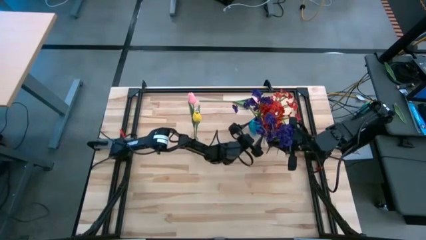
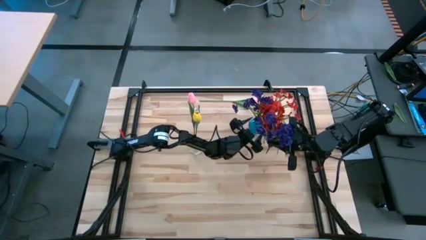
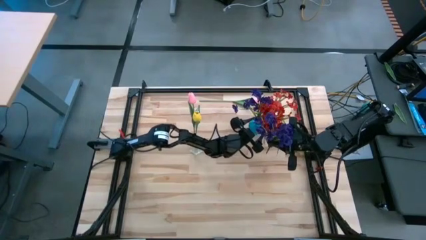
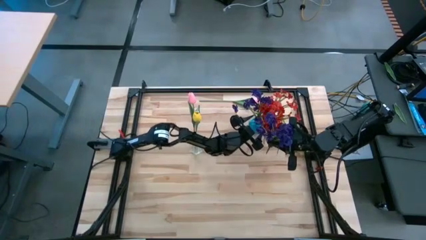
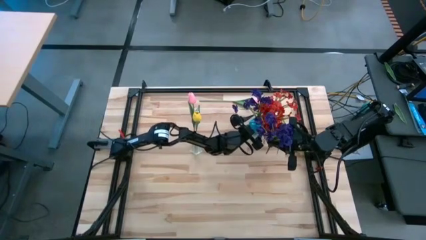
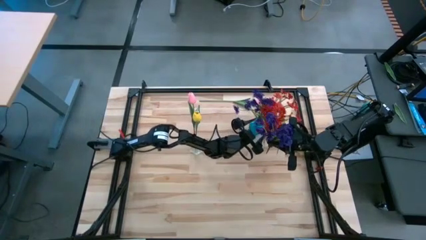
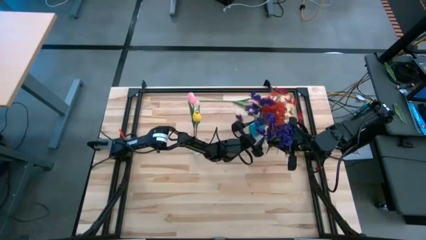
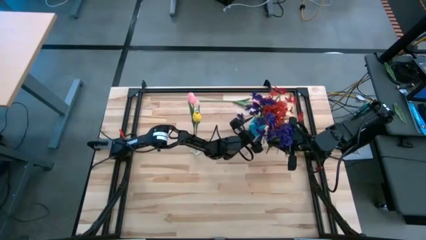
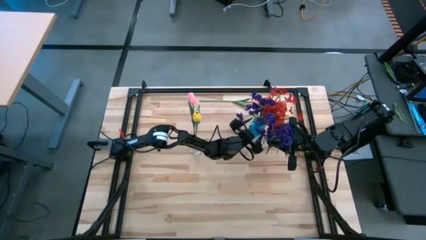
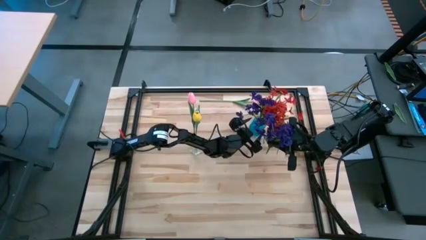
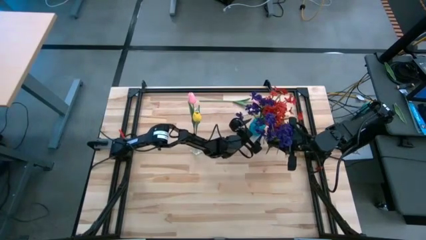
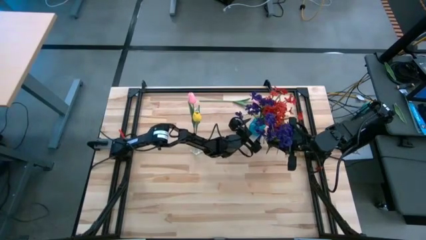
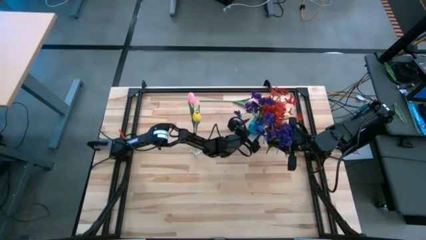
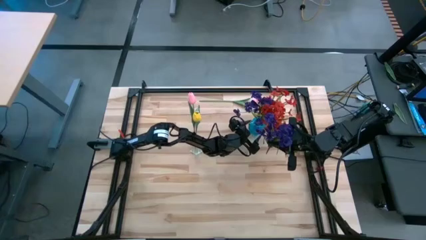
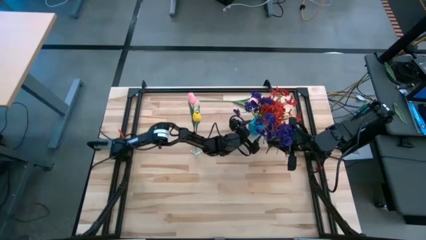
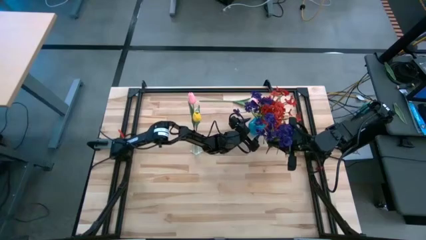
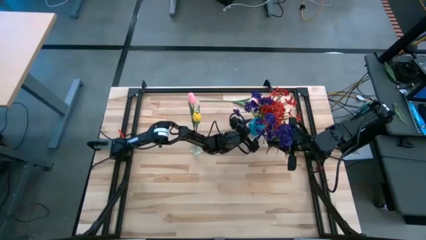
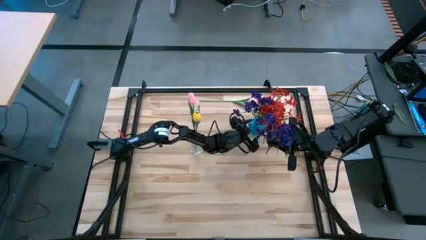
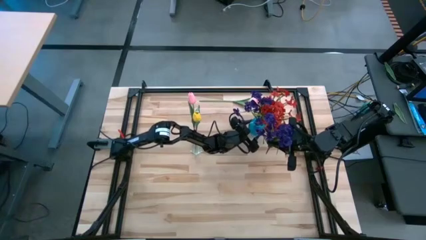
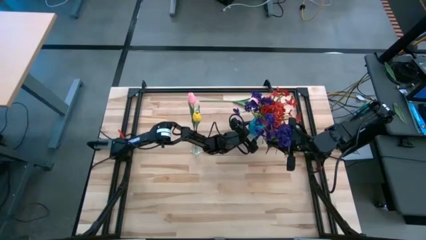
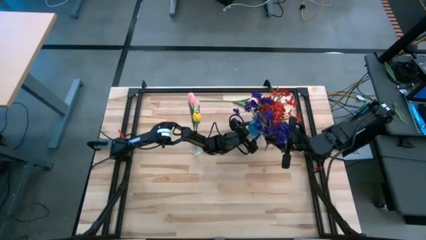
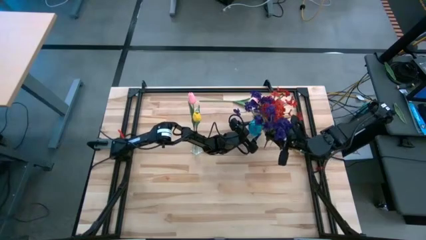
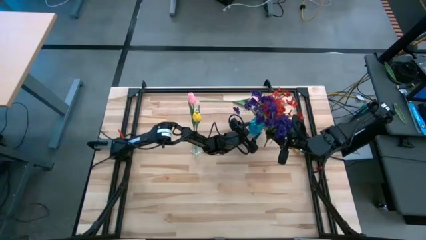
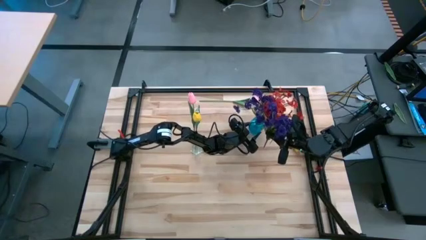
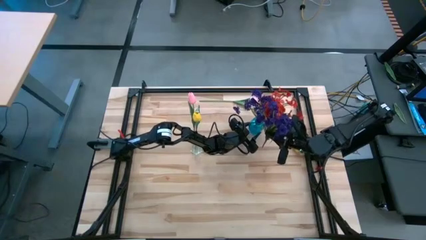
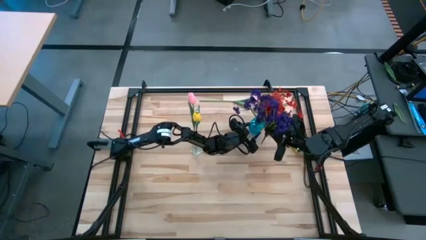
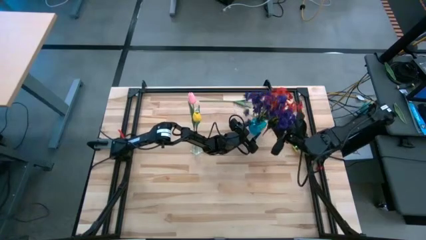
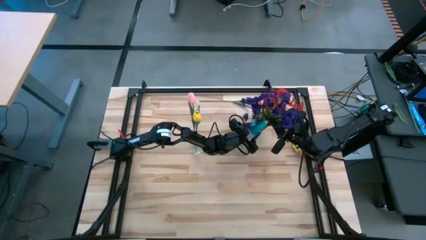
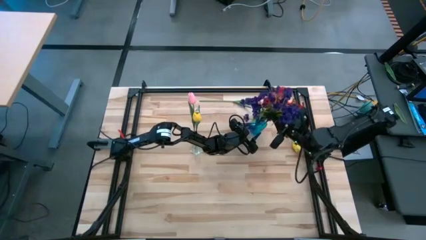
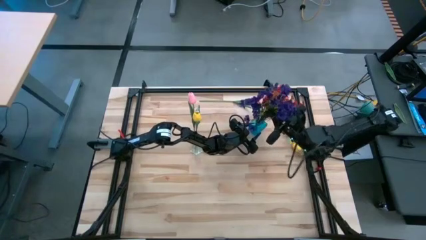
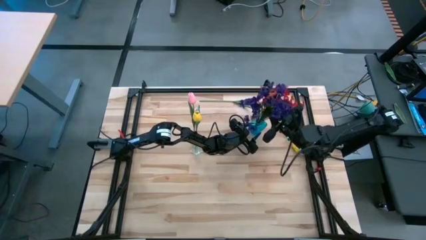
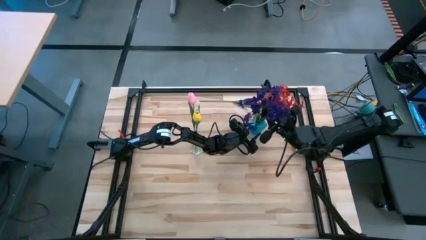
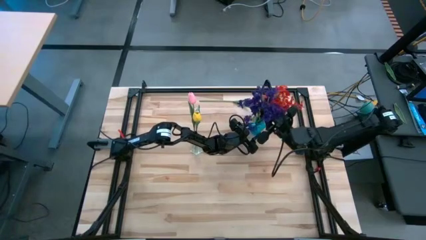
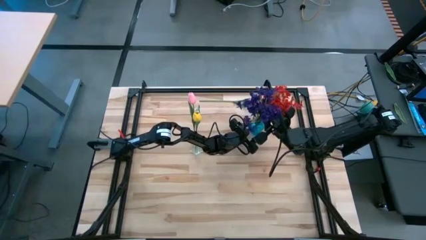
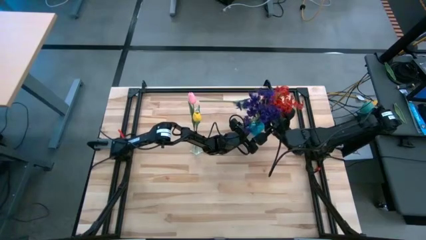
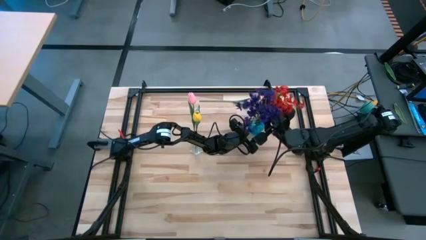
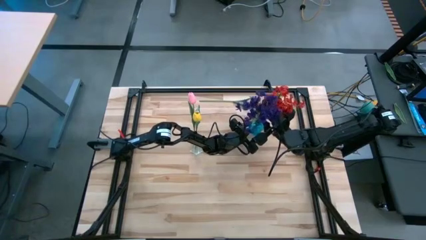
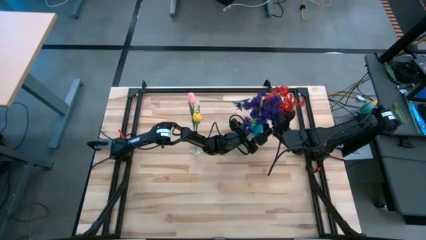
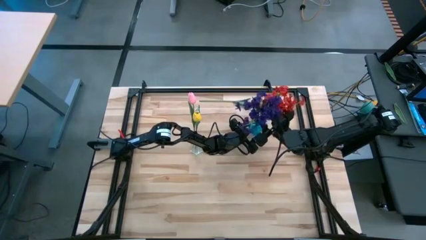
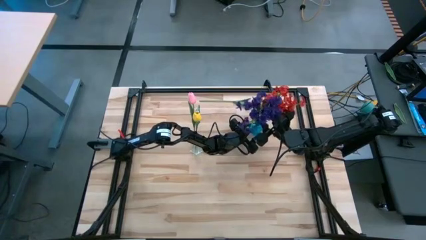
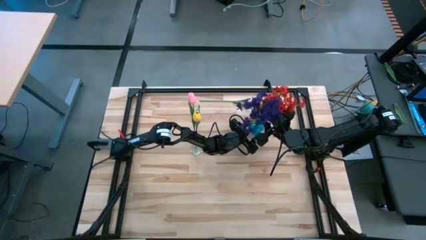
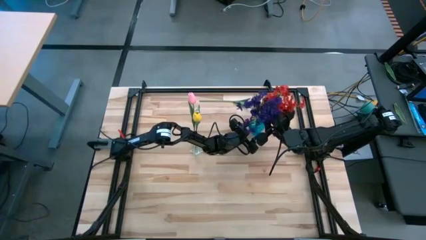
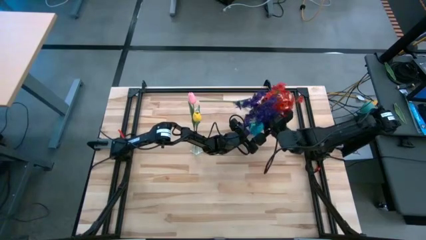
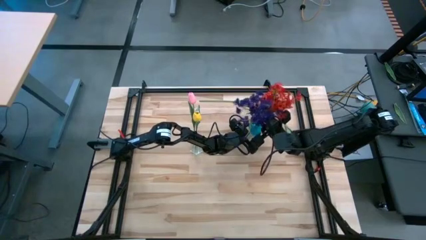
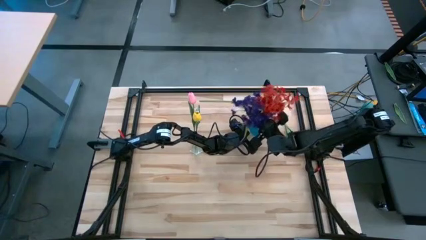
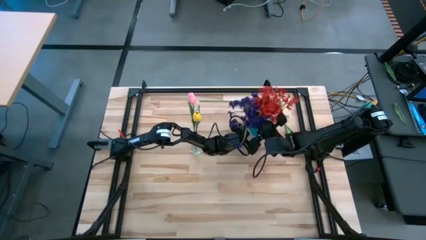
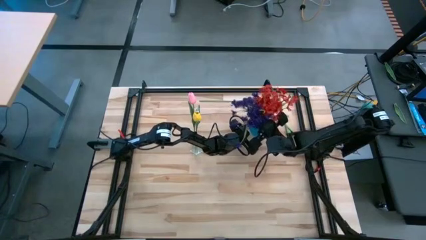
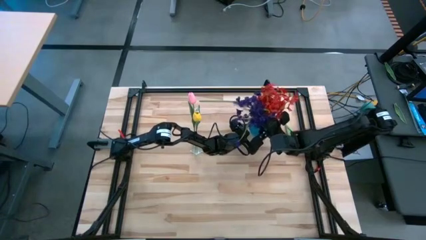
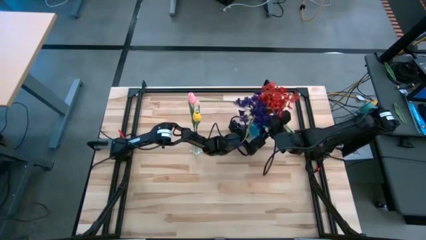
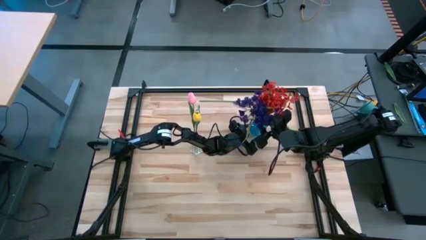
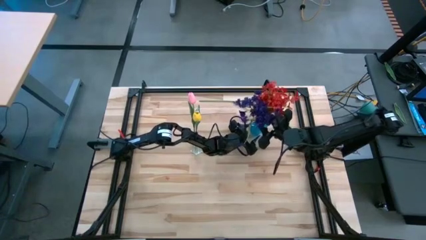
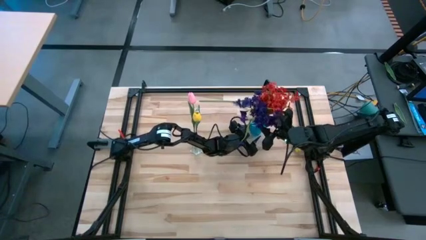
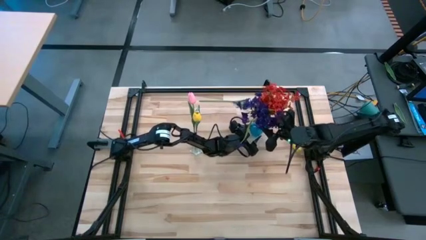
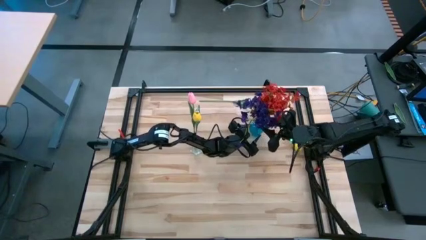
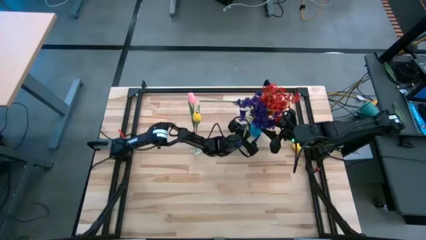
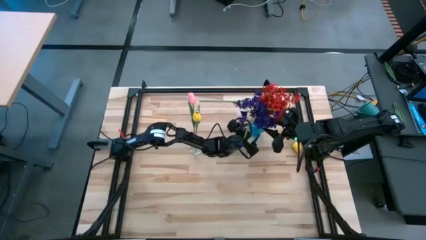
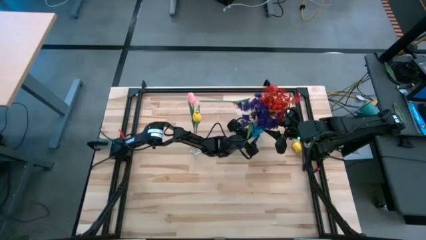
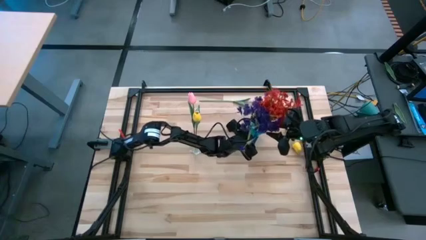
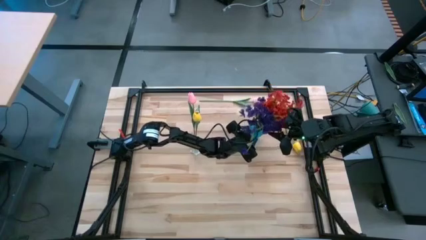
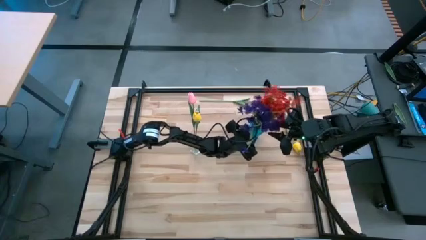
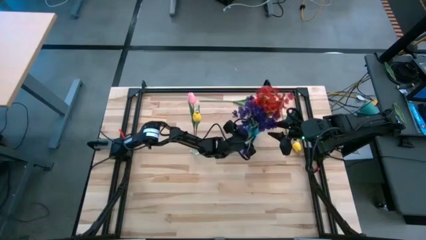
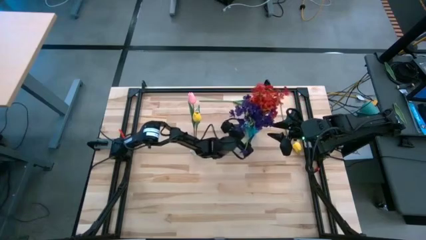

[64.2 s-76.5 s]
Task: Sort flowers into vase by color
Put the purple flower into the blue vase

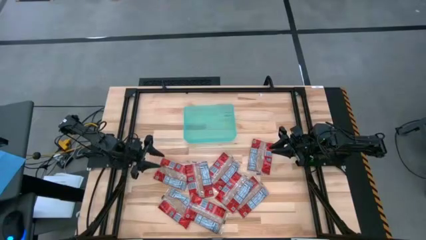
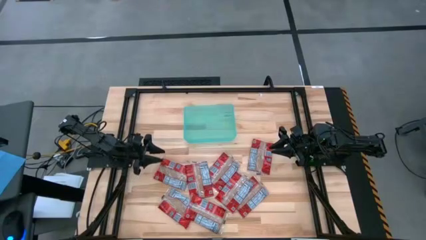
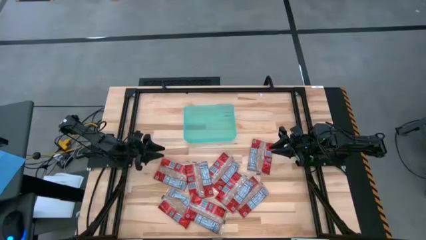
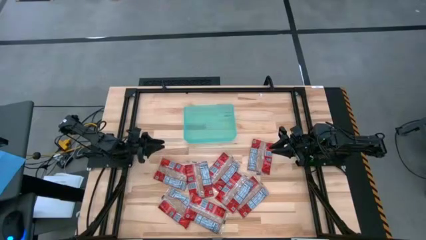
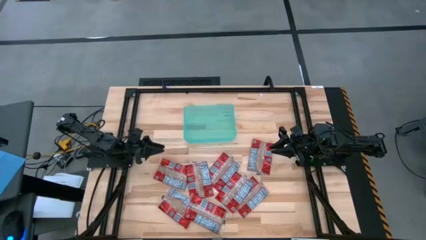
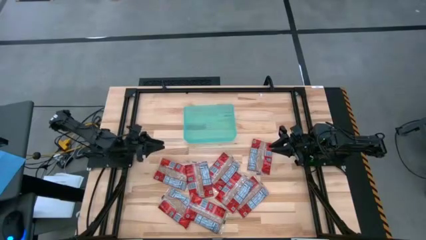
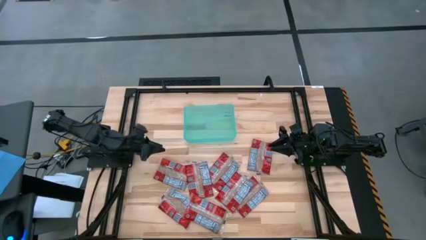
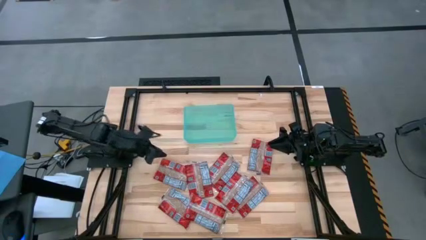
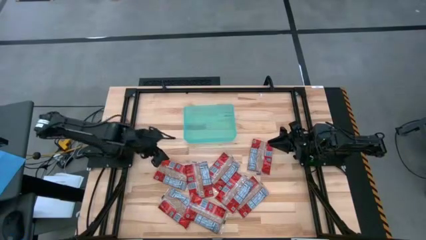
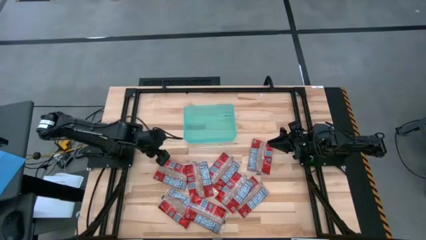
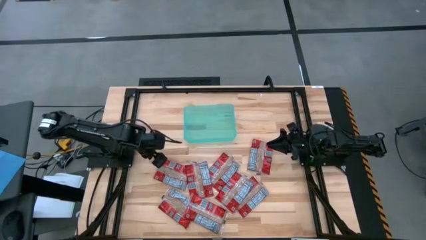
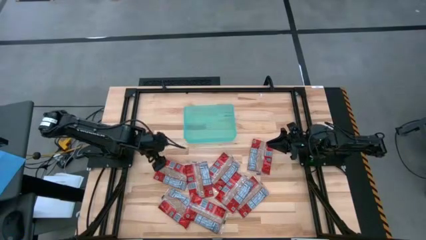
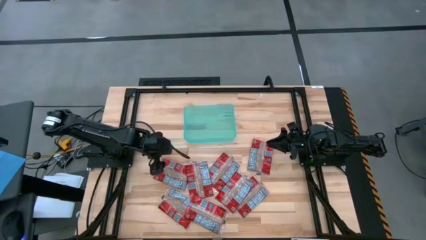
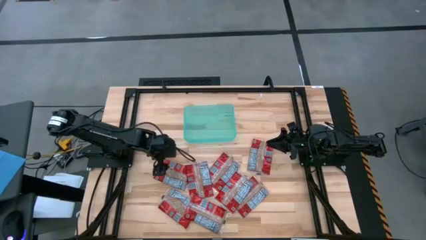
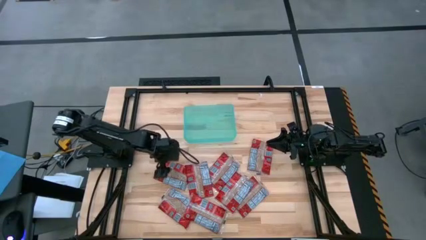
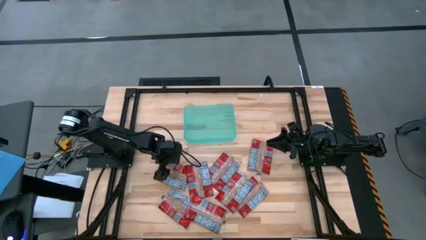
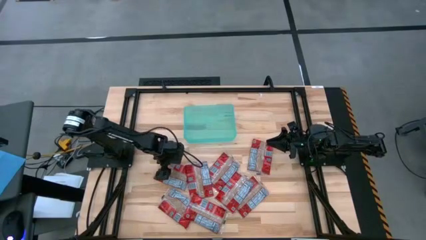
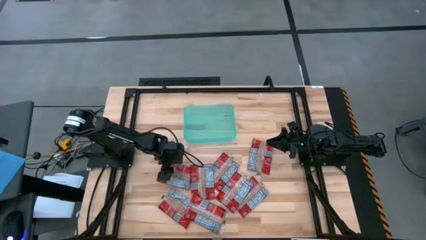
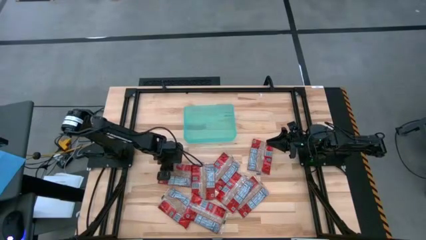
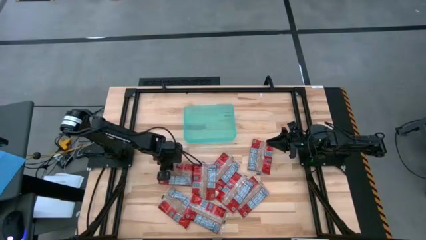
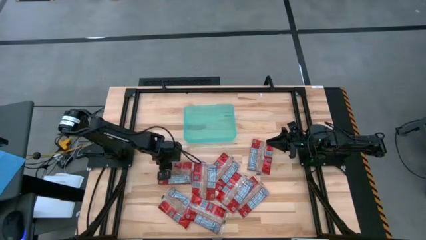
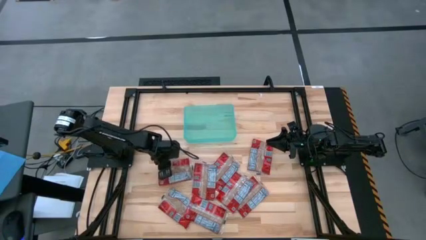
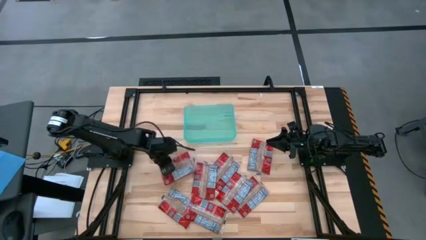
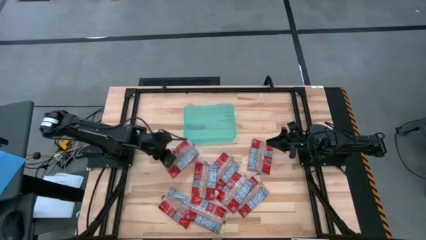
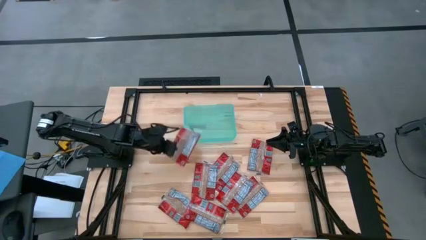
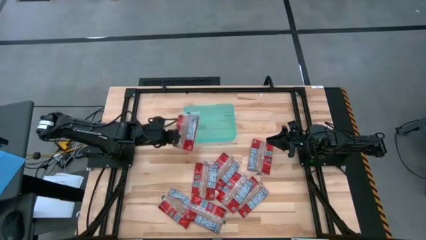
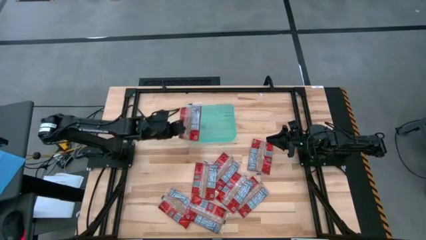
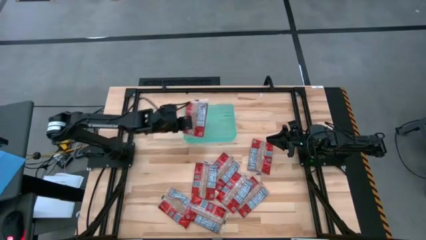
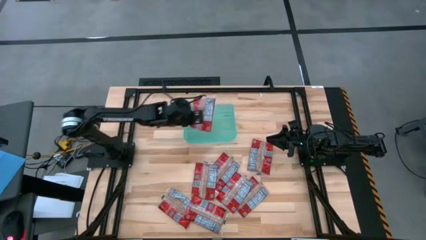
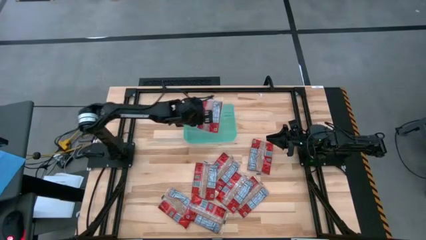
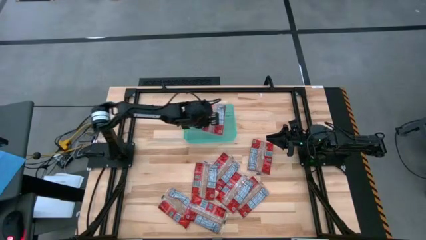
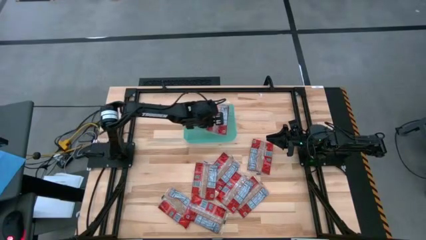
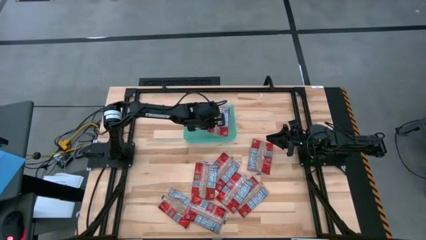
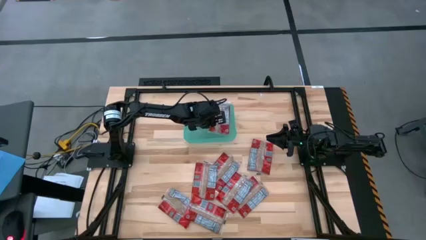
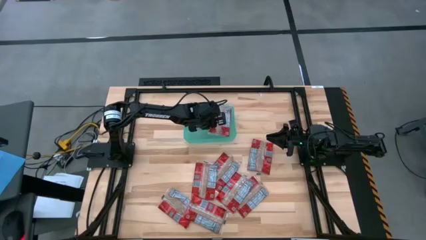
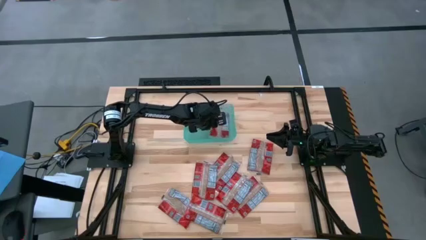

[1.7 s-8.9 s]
Task: Sort popcorn bags into baskets
Put the red popcorn bag into the blue bin
